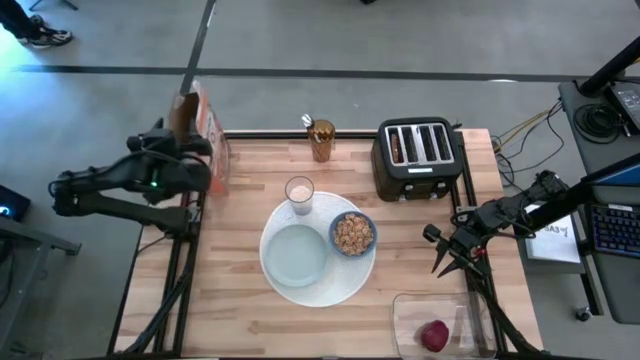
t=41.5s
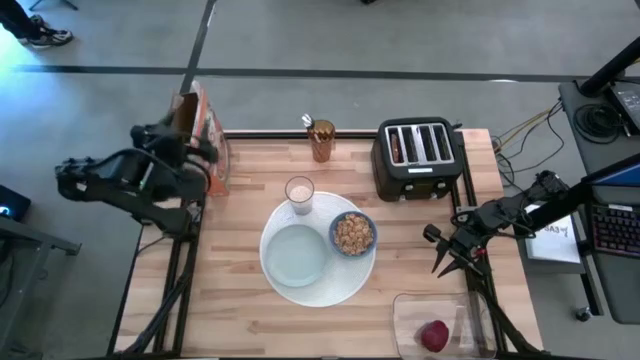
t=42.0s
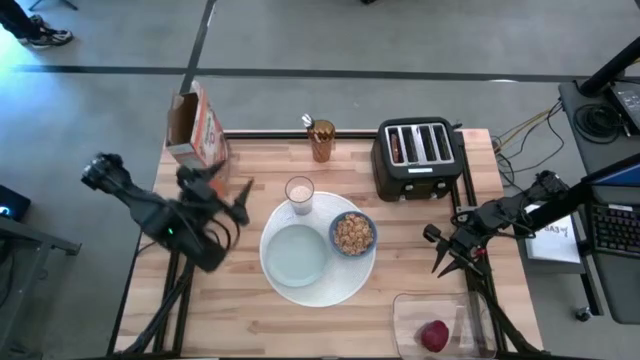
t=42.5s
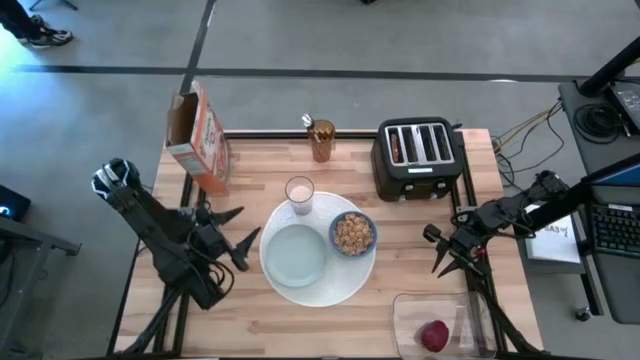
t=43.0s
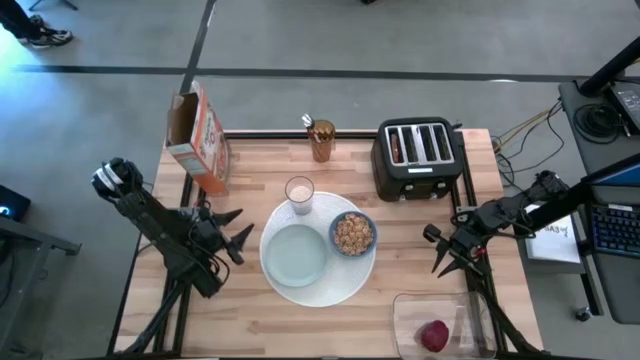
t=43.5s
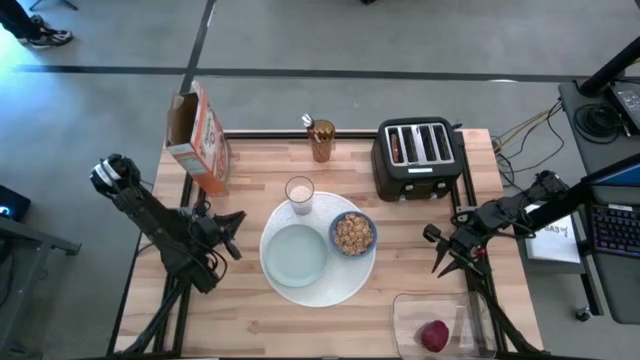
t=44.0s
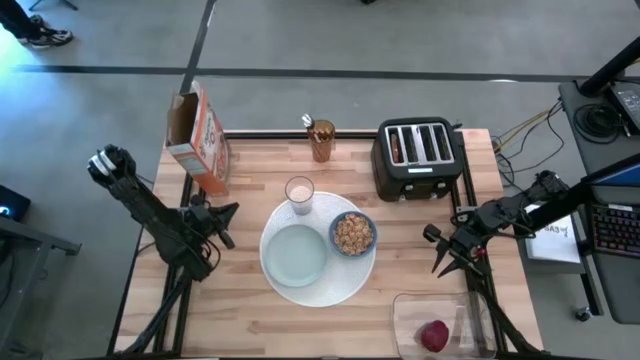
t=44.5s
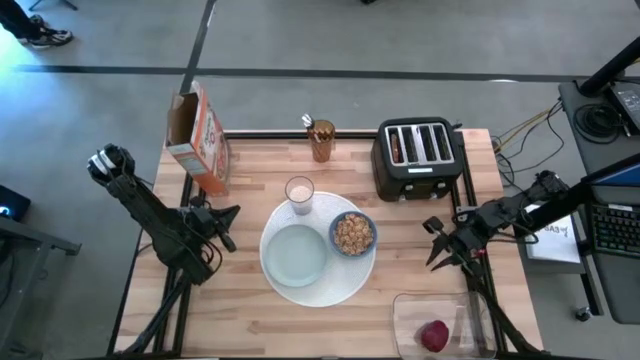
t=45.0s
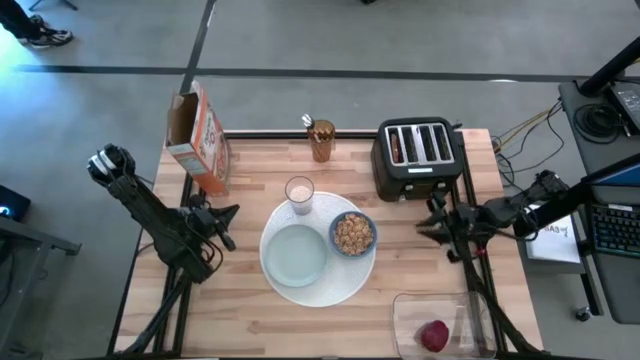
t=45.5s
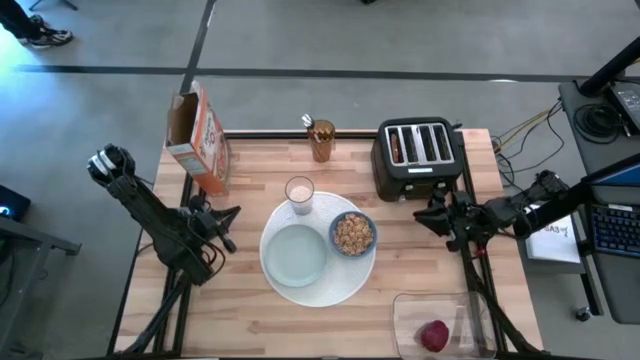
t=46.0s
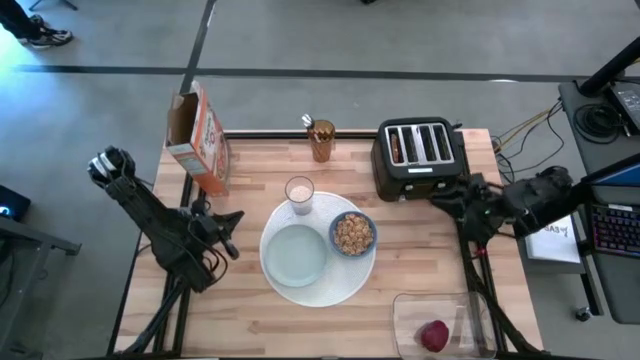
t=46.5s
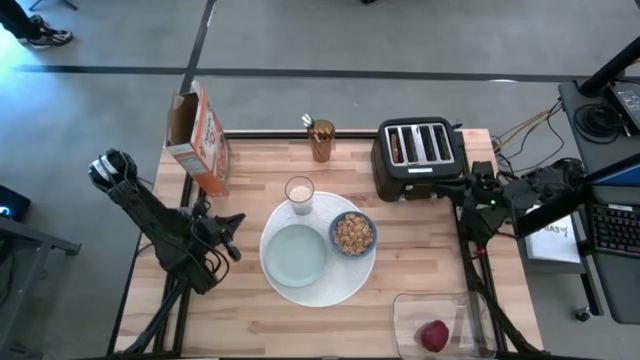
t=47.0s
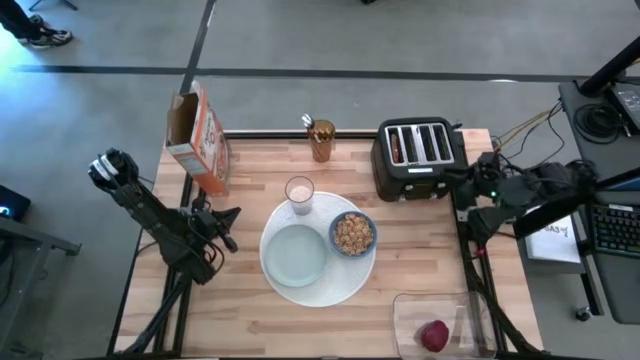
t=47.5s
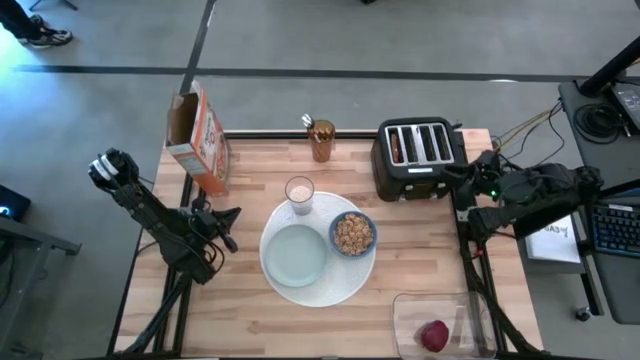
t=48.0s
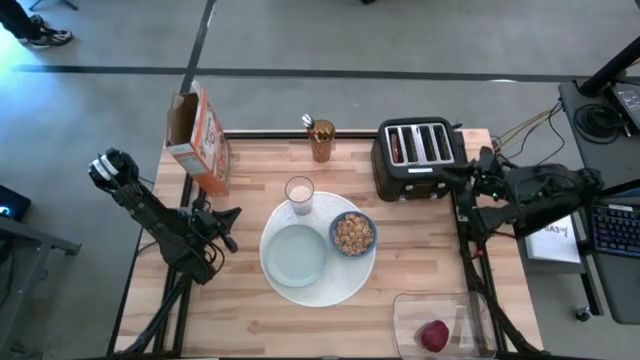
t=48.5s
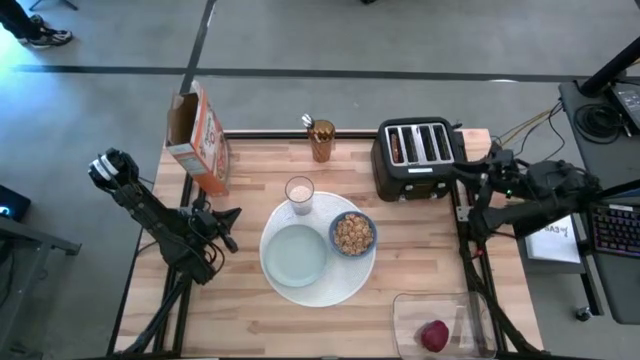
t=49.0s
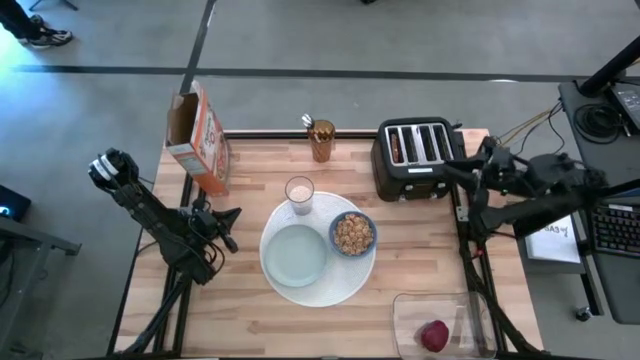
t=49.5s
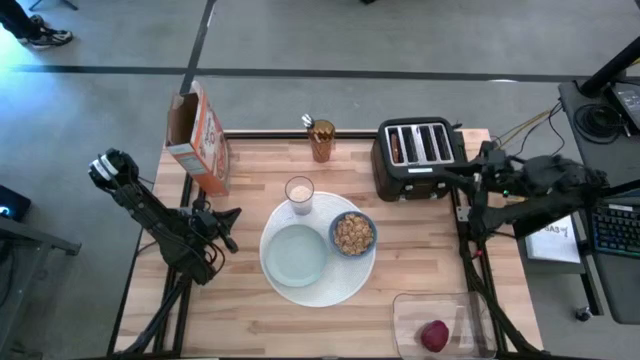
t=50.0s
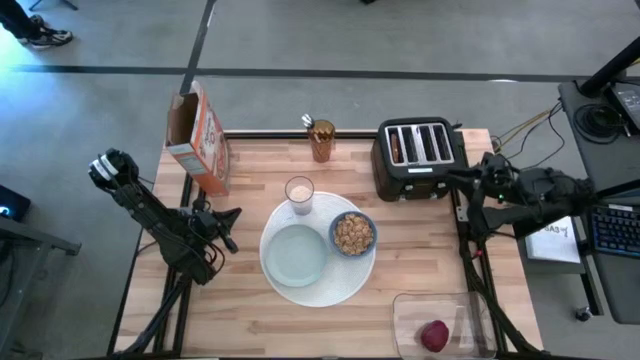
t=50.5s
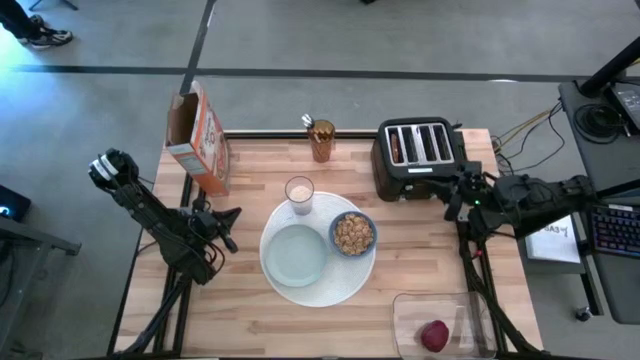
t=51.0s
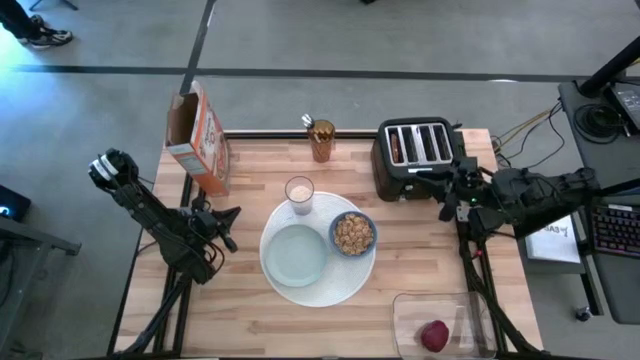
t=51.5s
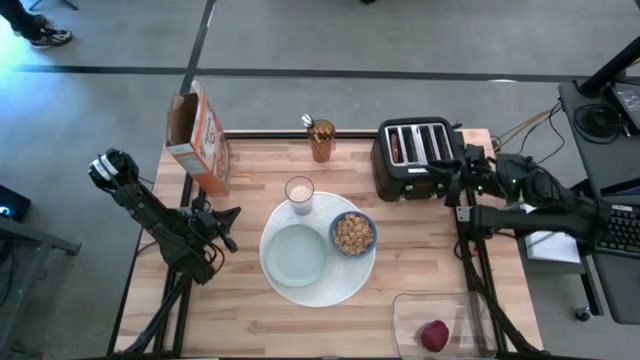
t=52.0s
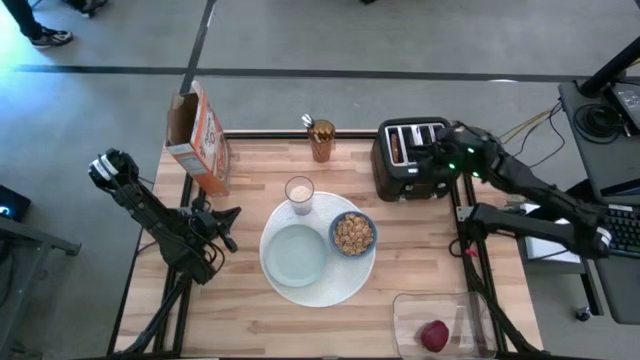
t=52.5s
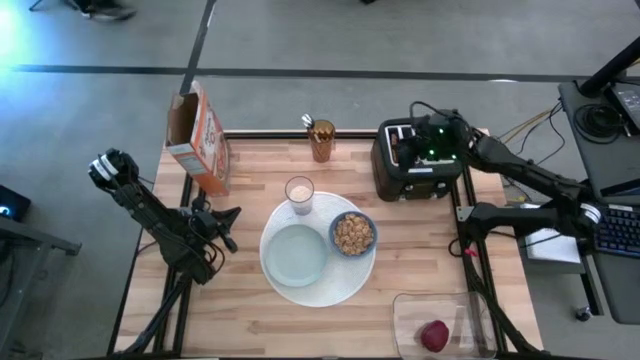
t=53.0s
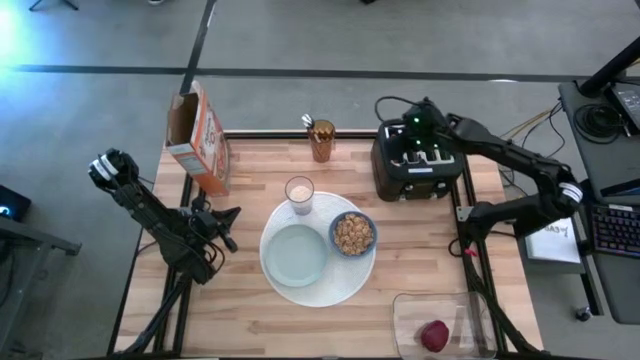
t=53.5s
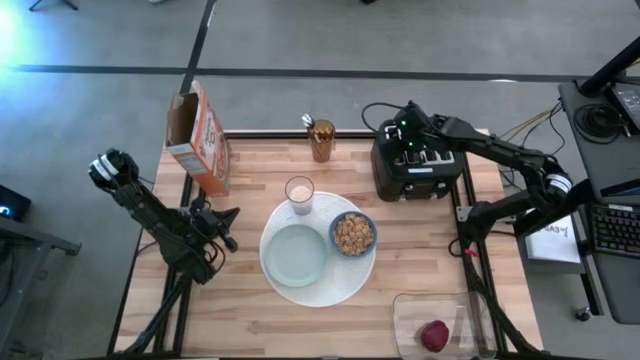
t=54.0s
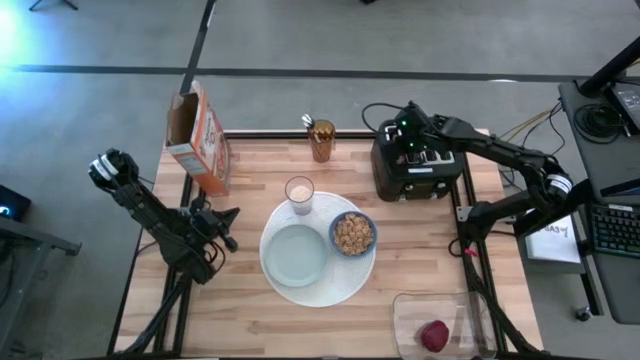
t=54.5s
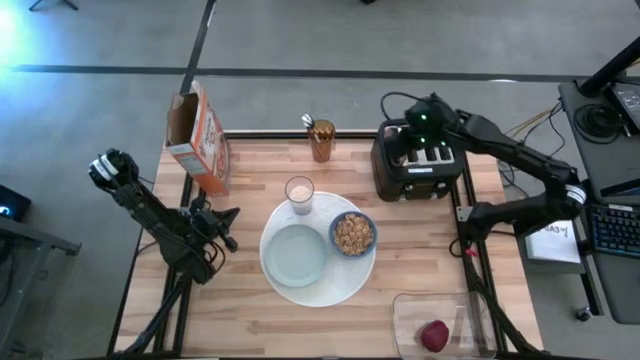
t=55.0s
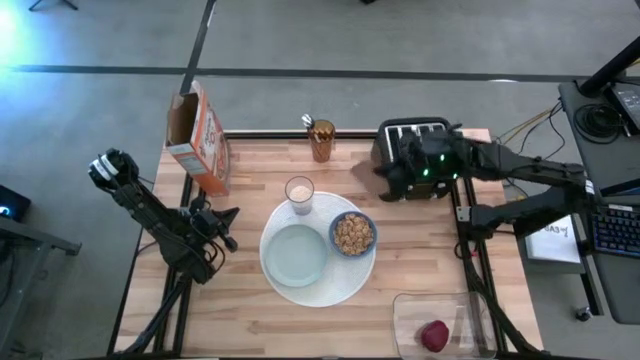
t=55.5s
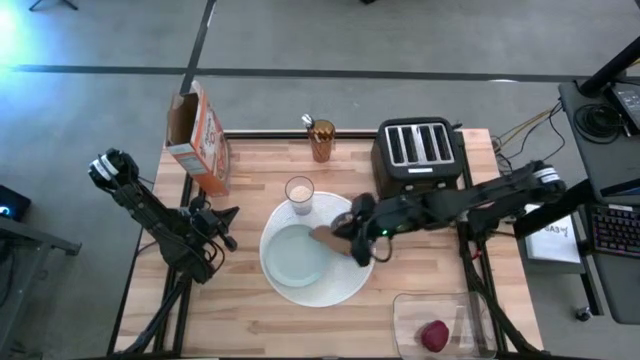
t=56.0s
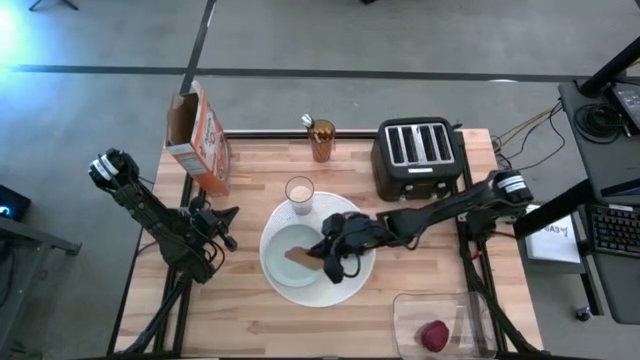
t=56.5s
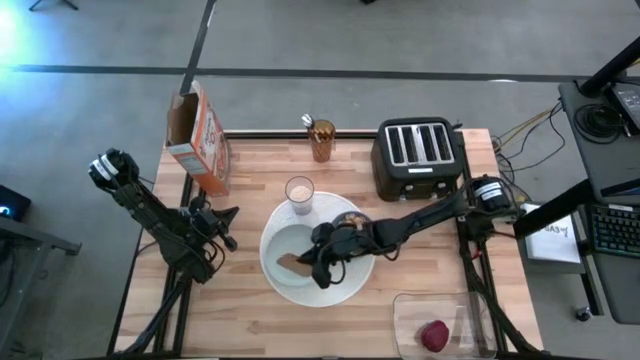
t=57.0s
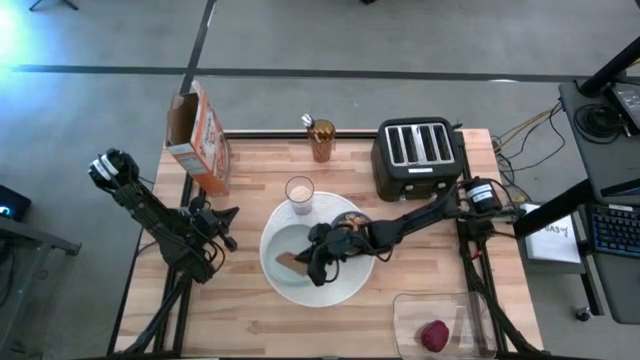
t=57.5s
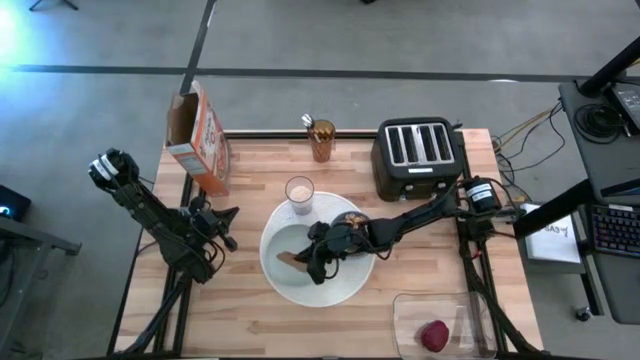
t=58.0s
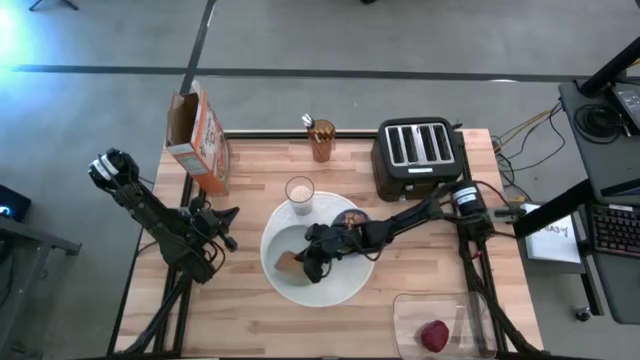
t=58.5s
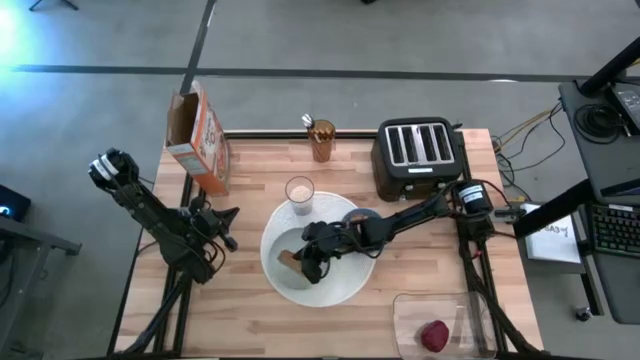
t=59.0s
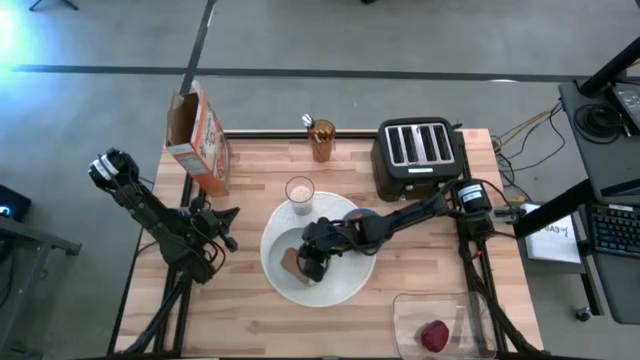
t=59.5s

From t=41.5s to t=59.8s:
Task: Arrange a breakfast setting
Put the toasted bread on the plate

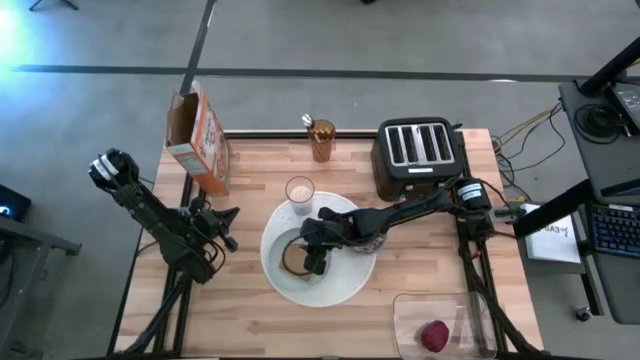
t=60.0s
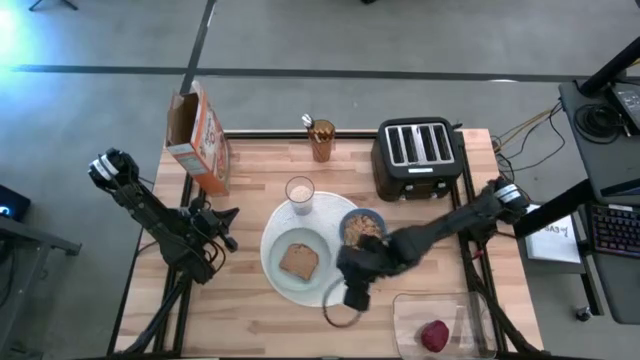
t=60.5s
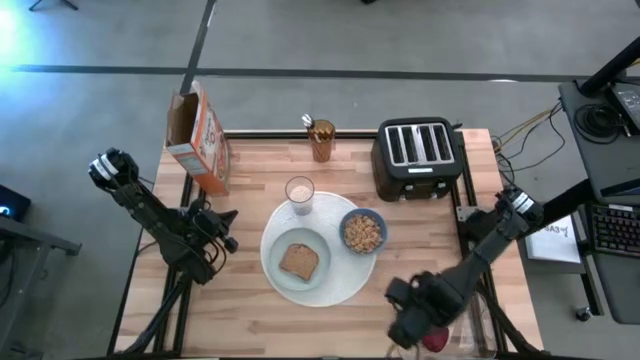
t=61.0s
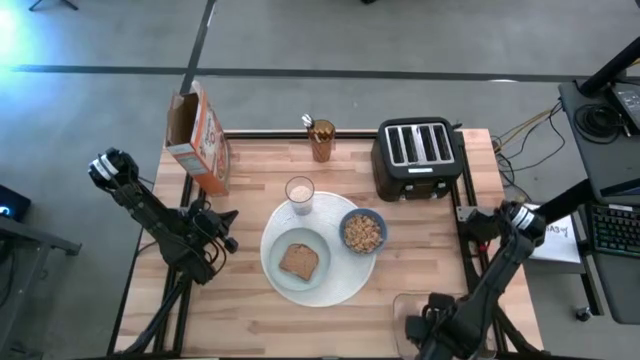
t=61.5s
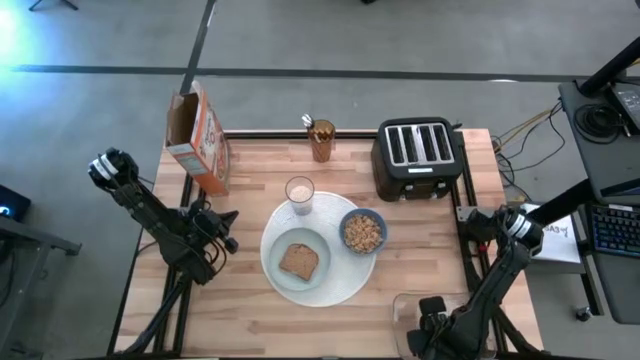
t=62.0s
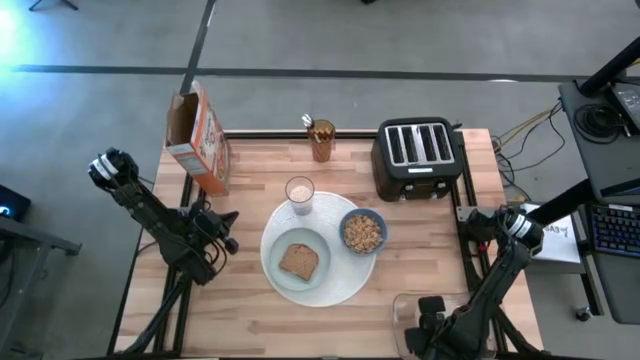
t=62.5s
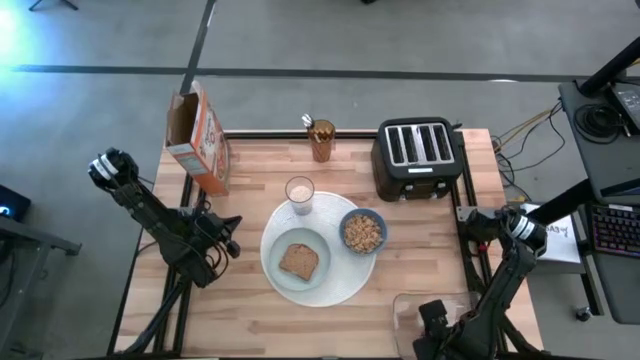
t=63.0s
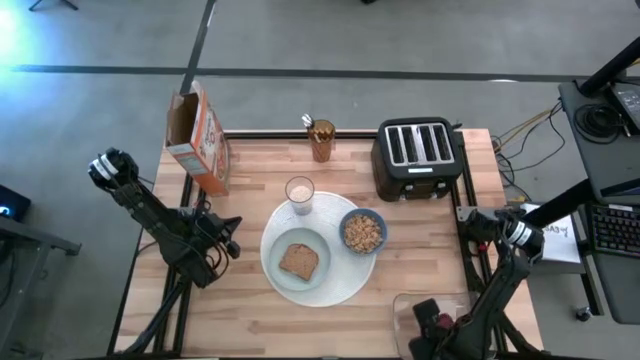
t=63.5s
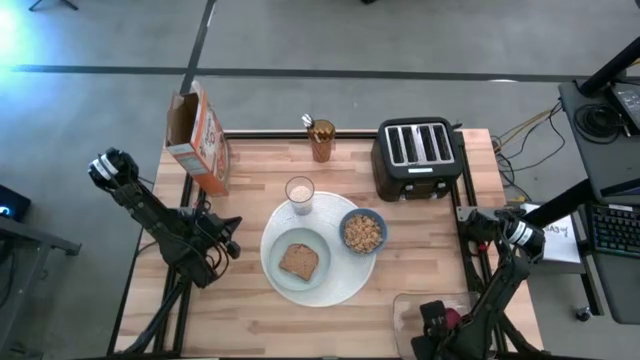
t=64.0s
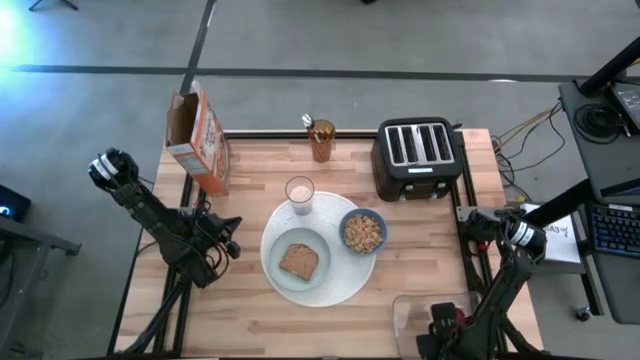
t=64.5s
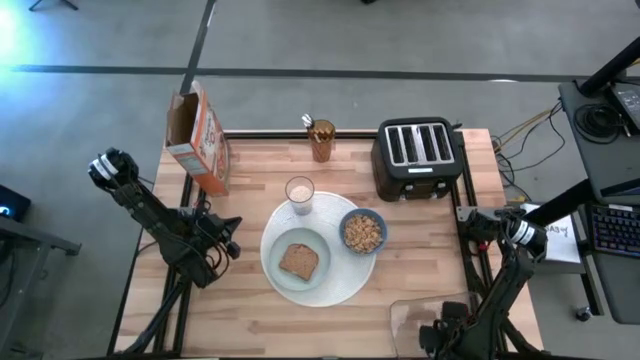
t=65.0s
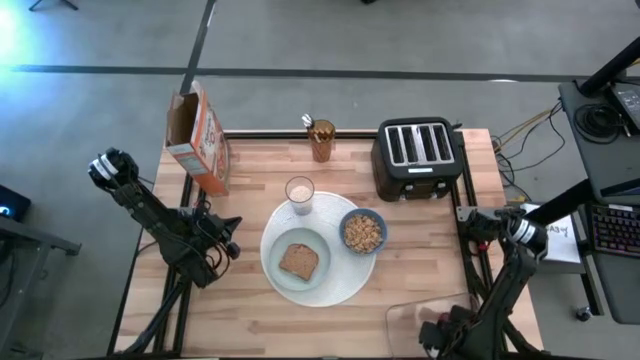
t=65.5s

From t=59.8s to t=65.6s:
Put the apple on the placemat
